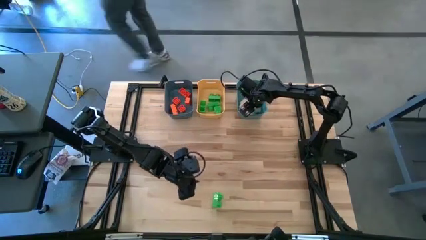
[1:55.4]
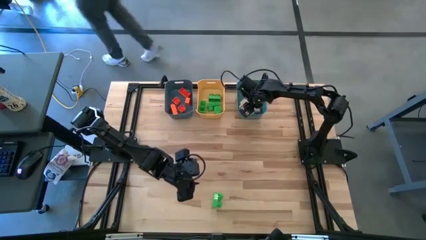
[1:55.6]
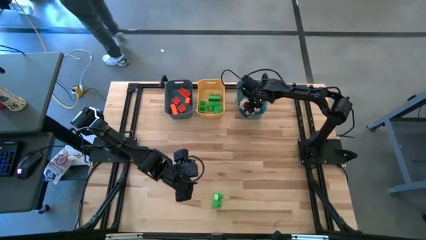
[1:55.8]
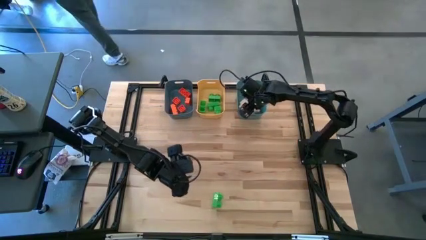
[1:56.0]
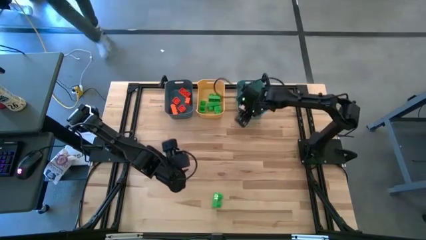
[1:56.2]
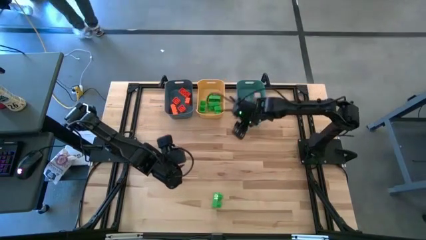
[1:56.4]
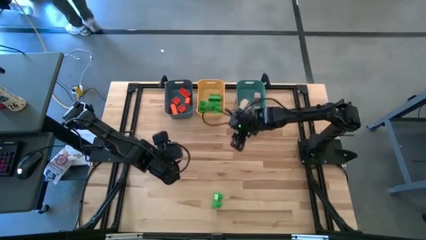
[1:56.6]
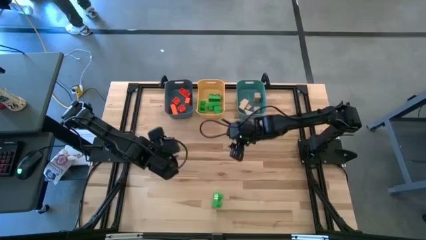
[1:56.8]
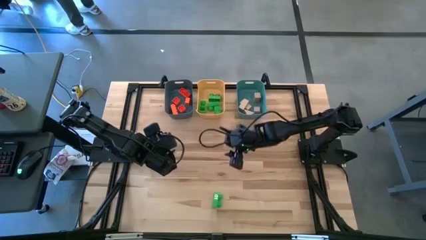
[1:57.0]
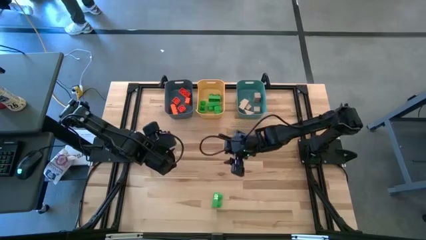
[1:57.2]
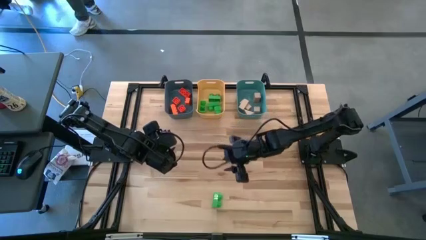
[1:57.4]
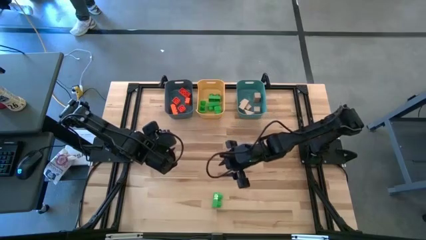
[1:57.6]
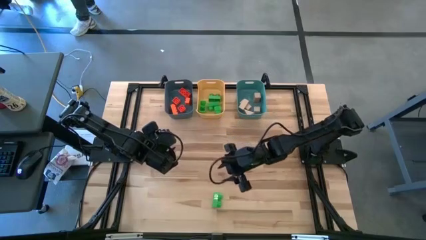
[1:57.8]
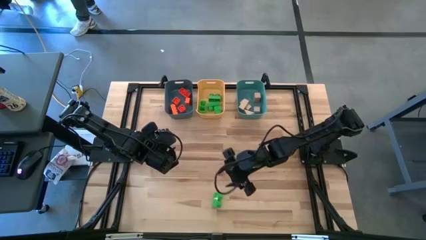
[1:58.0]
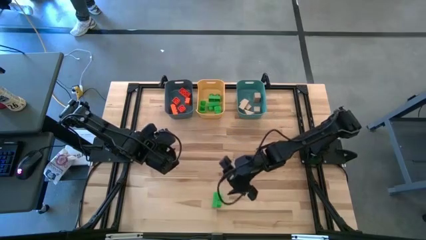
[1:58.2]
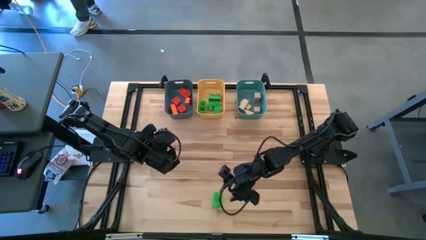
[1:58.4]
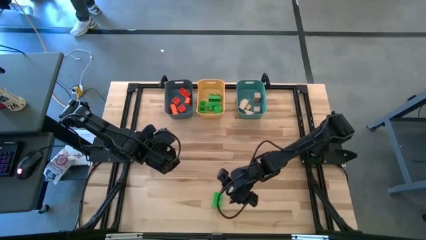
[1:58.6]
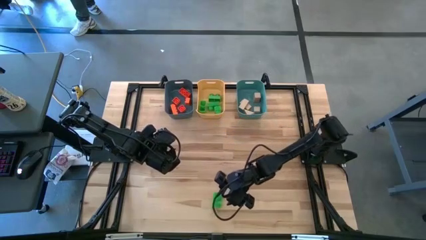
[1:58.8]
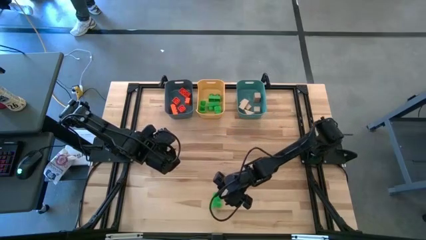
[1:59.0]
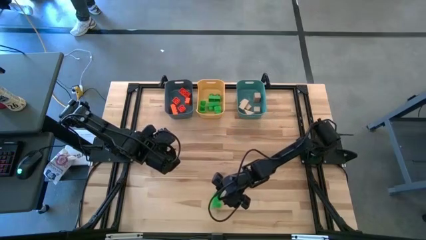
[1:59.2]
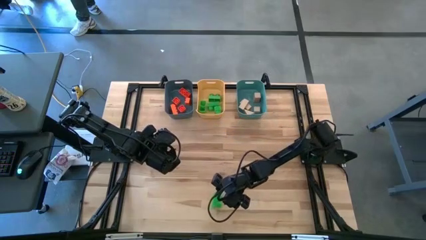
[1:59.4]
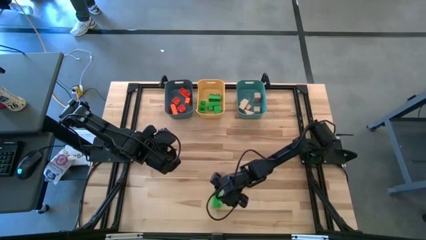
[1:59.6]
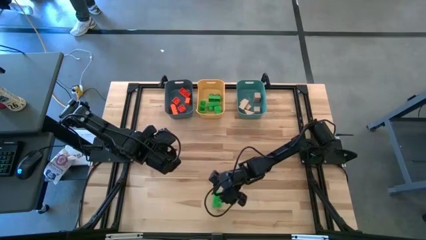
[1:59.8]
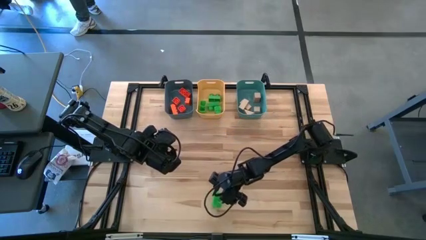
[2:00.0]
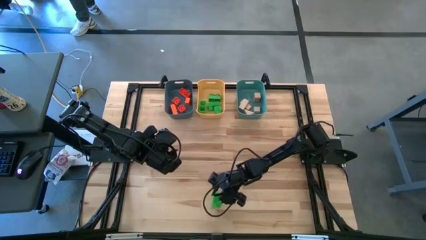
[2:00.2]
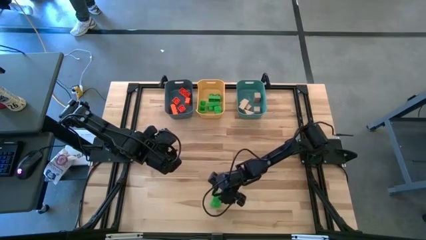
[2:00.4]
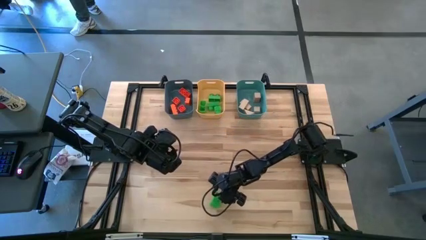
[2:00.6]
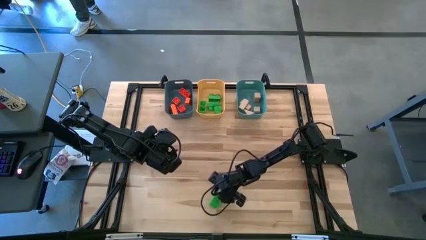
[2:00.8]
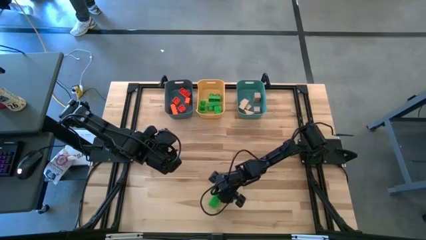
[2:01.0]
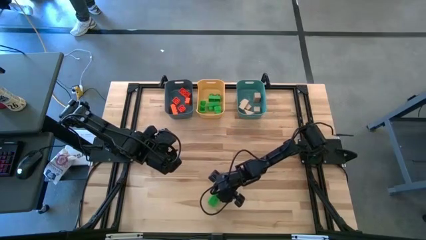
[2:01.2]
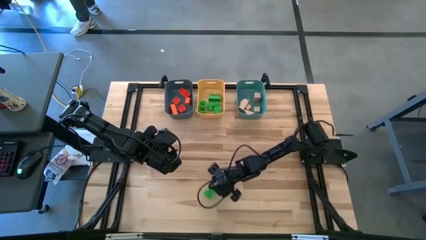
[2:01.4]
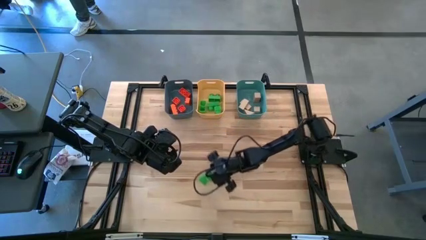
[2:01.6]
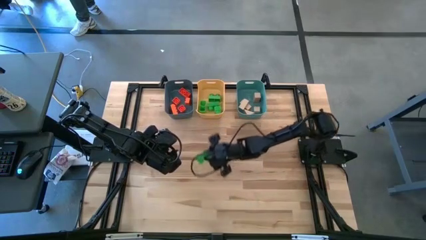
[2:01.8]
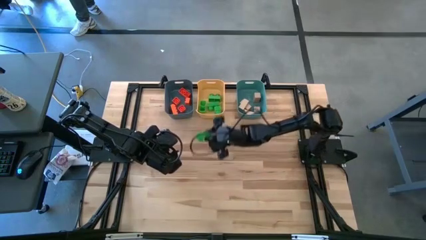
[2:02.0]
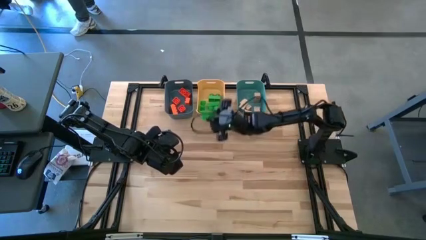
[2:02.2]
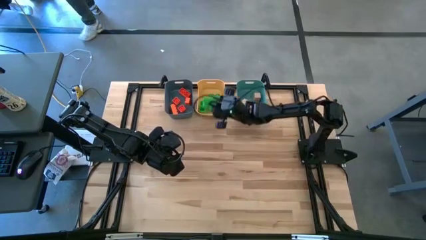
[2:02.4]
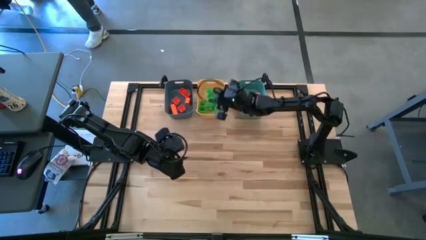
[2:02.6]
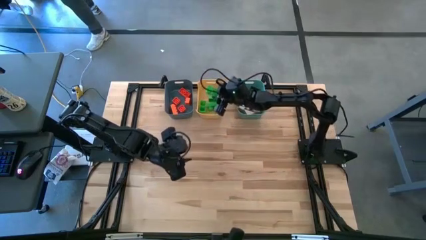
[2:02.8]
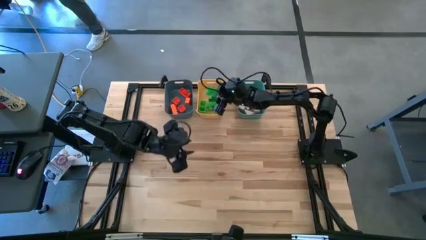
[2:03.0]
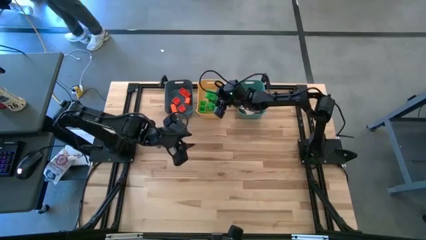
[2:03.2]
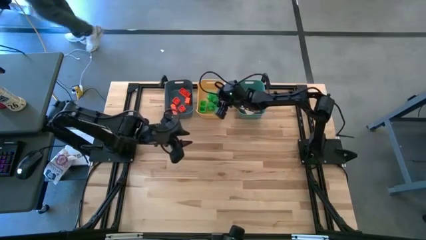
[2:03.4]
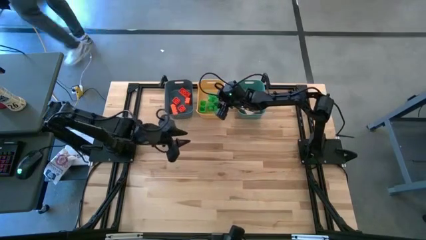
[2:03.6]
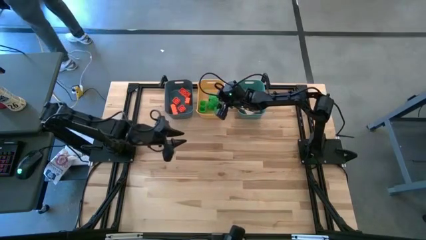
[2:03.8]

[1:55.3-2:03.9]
Task: Sort & place blocks by color
Put the green game piece into the yellow bin

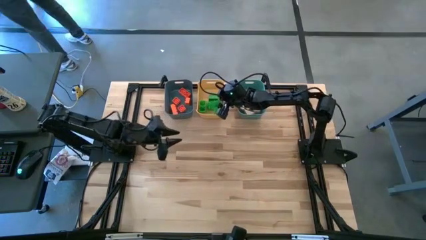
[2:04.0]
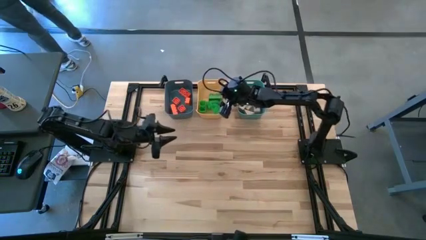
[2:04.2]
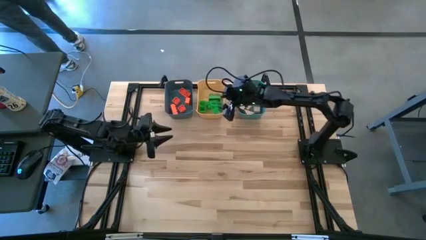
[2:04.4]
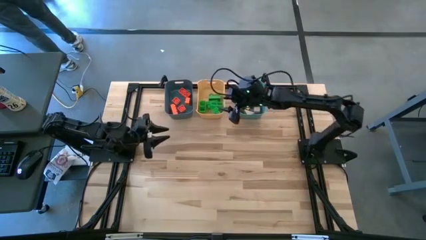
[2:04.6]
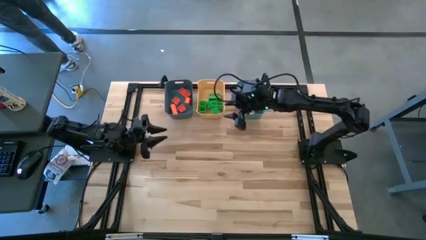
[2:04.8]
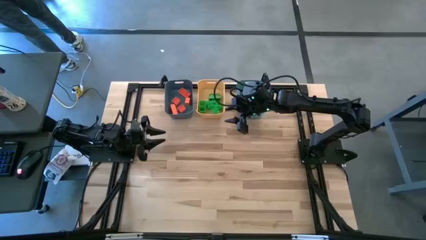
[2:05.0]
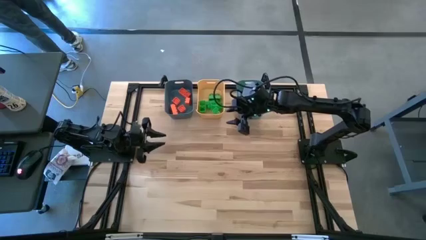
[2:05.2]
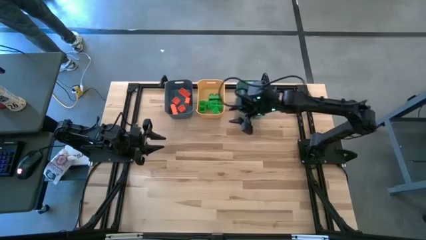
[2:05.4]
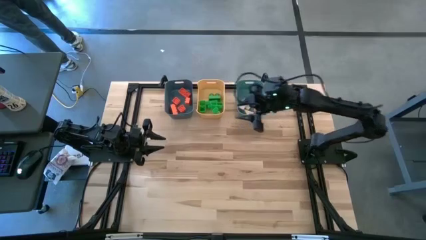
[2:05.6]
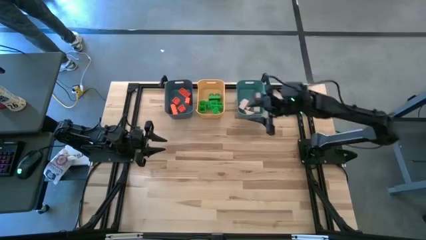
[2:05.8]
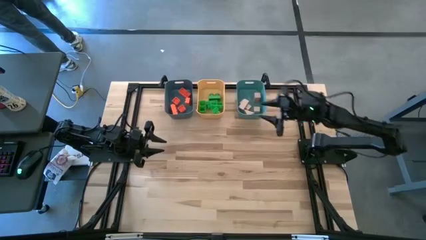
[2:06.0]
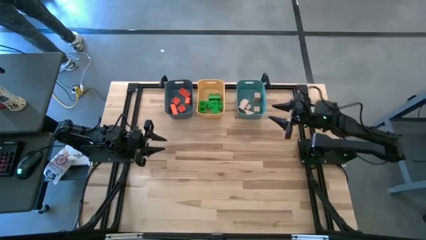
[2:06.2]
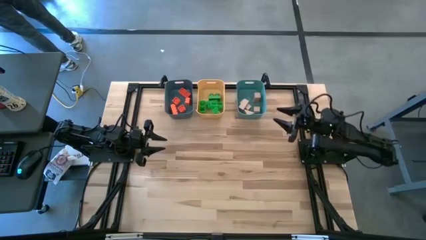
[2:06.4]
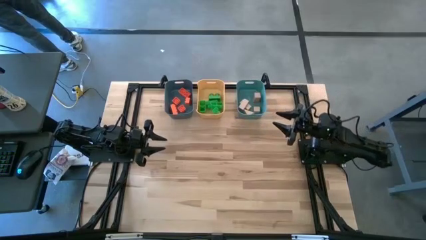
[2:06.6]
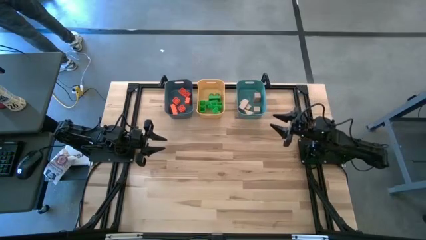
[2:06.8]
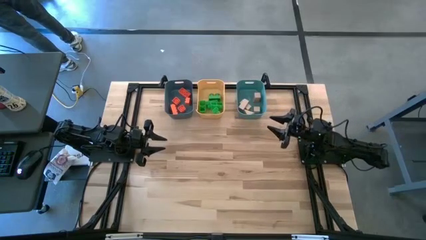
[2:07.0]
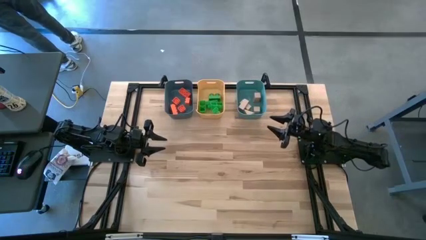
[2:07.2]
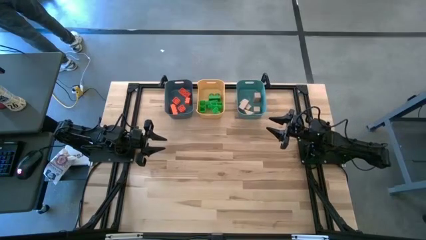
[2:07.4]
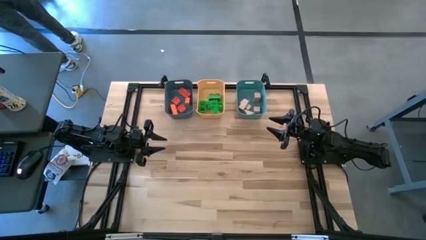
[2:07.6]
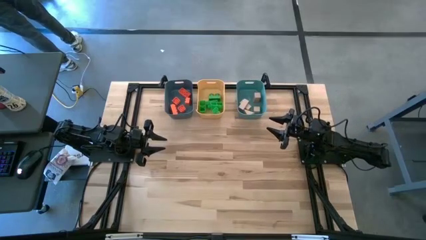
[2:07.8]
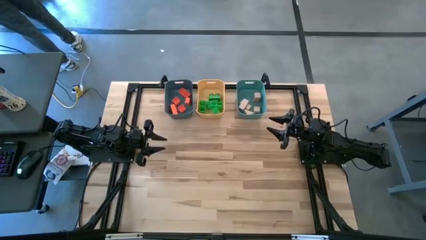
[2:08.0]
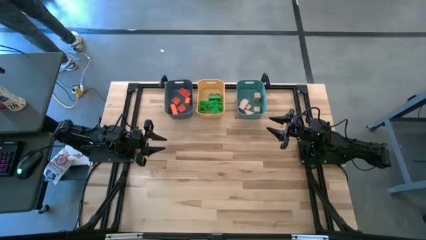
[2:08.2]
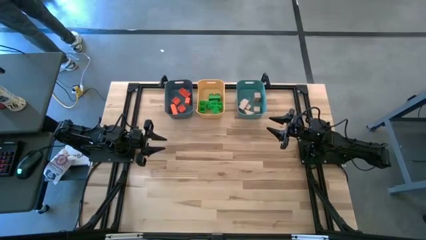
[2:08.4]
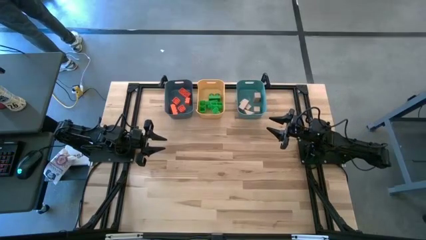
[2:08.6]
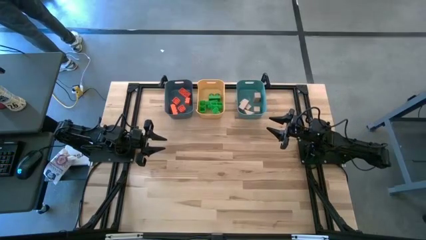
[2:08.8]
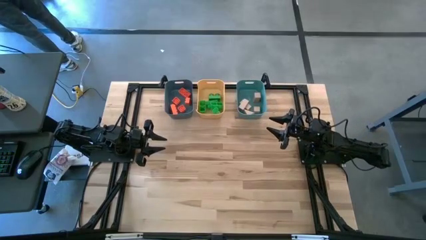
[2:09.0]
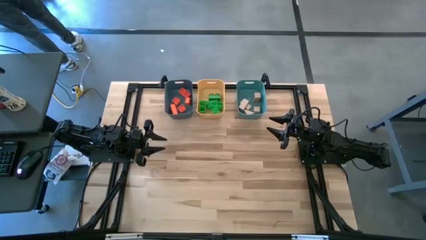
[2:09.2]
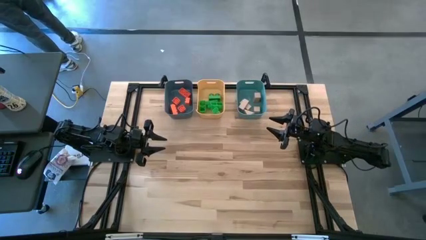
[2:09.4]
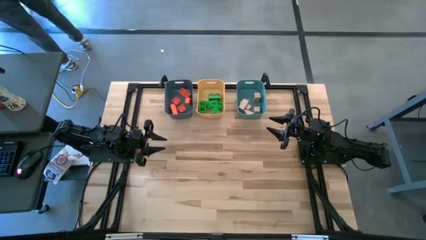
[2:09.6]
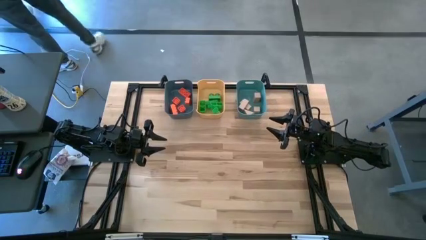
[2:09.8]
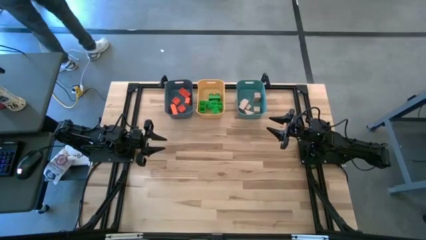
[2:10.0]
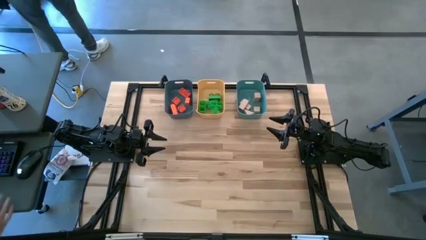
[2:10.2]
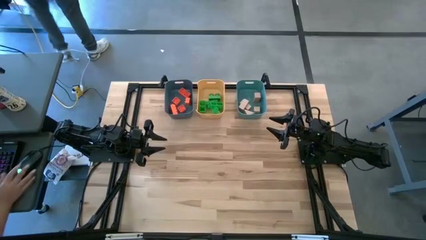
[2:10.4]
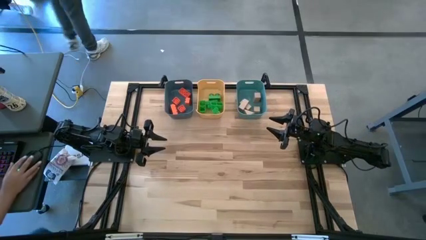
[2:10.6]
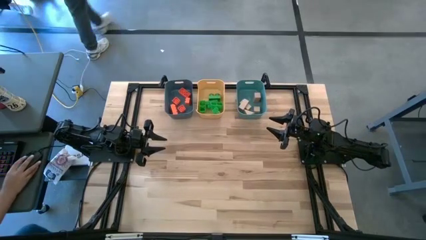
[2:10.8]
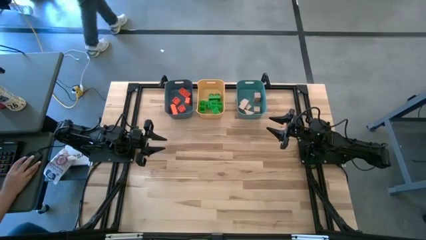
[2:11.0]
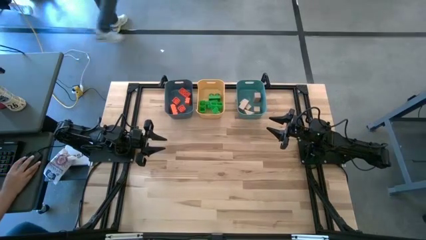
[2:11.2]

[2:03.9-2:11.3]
Return to Home Position
